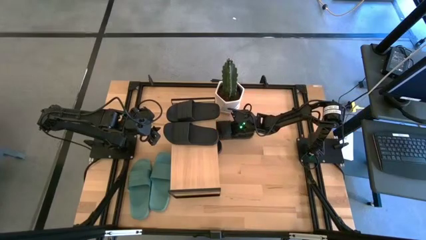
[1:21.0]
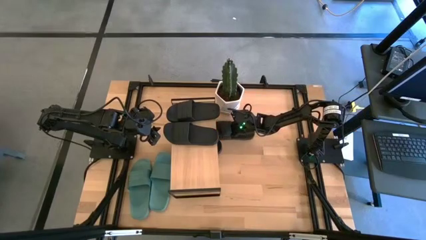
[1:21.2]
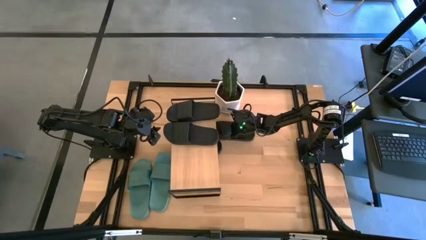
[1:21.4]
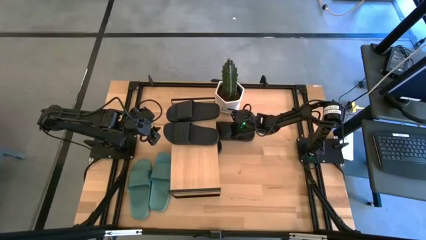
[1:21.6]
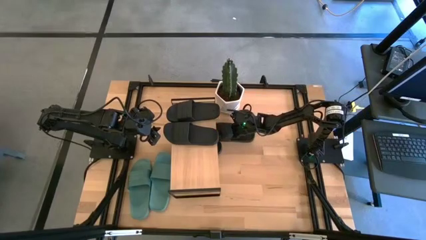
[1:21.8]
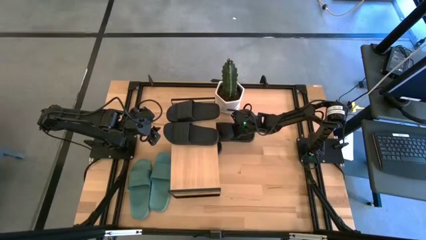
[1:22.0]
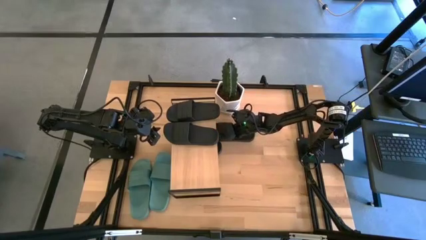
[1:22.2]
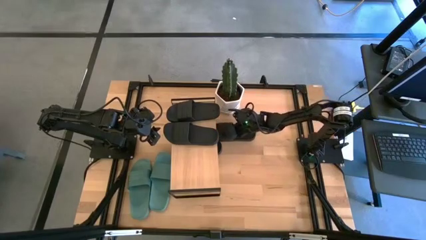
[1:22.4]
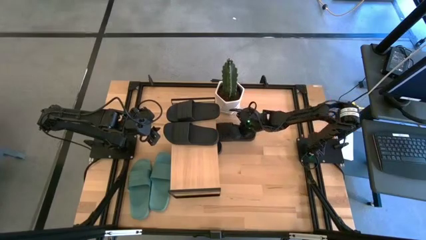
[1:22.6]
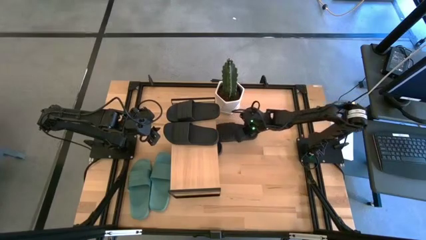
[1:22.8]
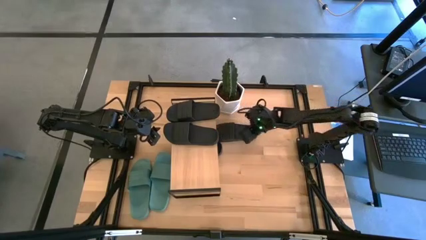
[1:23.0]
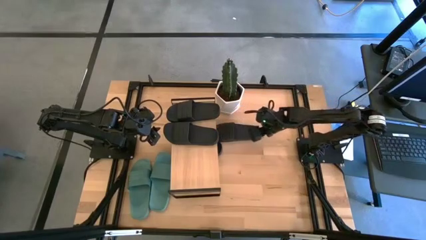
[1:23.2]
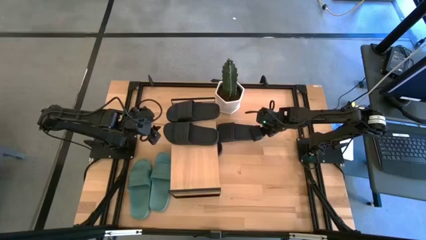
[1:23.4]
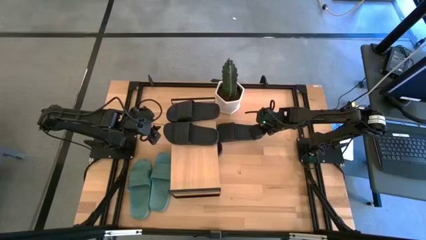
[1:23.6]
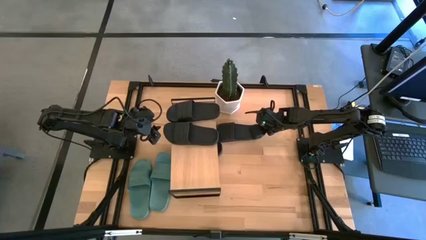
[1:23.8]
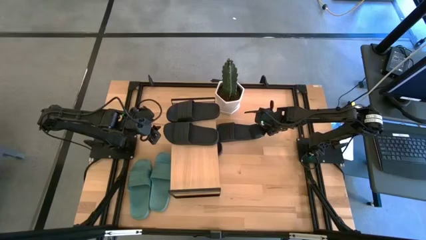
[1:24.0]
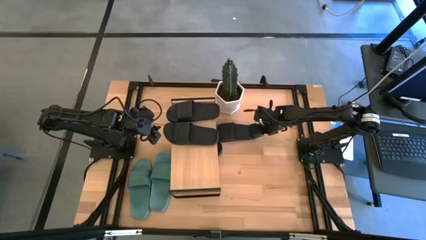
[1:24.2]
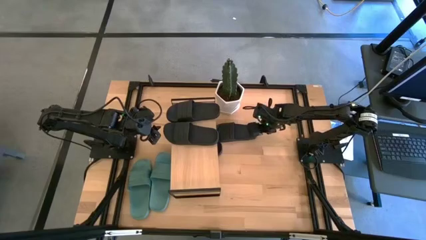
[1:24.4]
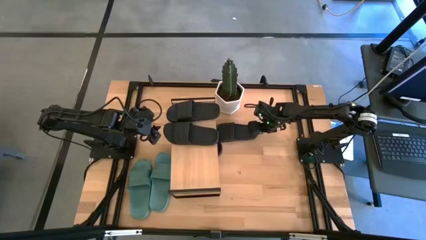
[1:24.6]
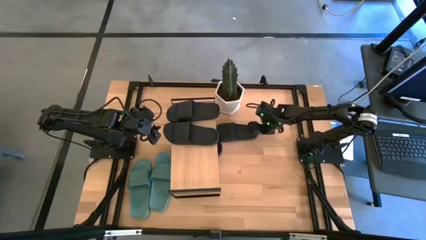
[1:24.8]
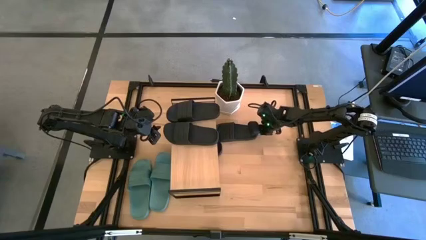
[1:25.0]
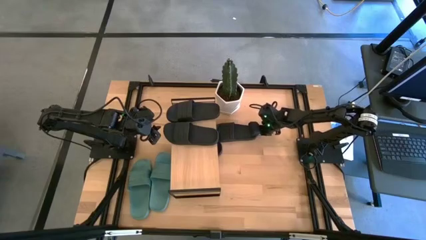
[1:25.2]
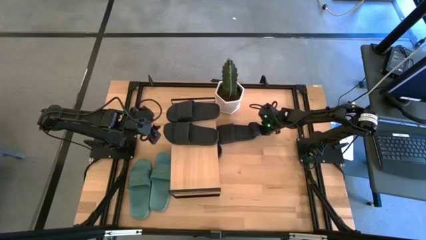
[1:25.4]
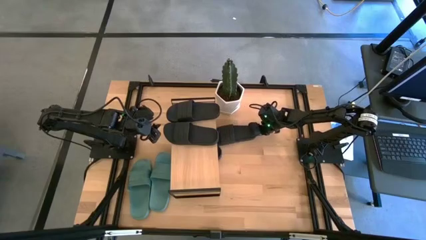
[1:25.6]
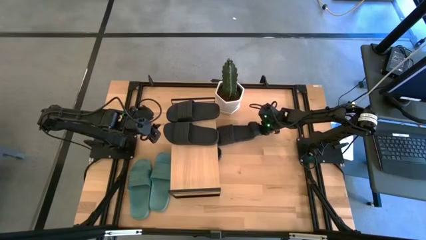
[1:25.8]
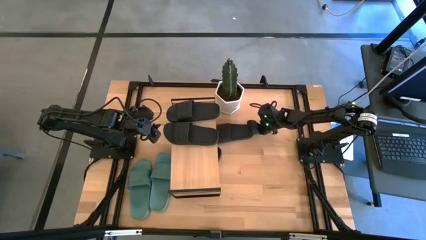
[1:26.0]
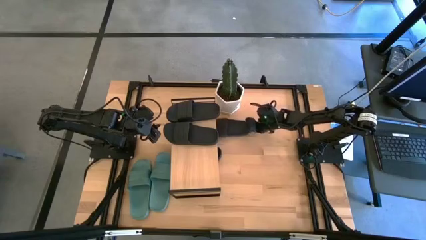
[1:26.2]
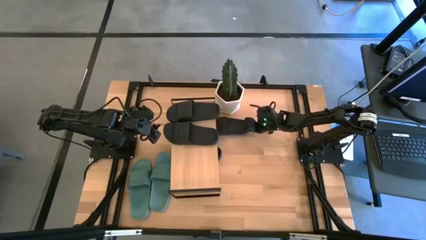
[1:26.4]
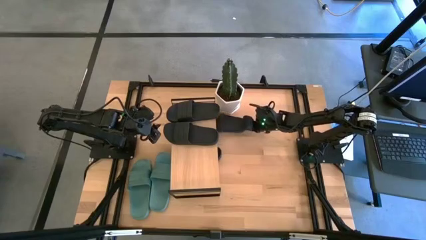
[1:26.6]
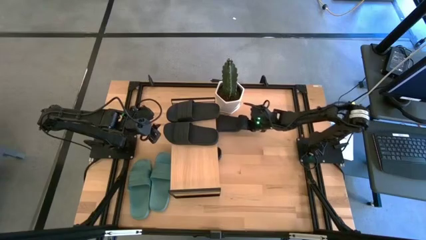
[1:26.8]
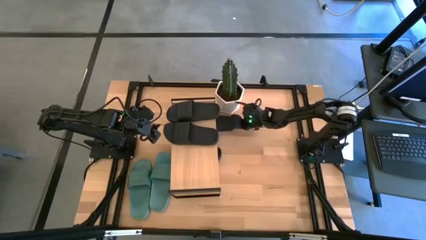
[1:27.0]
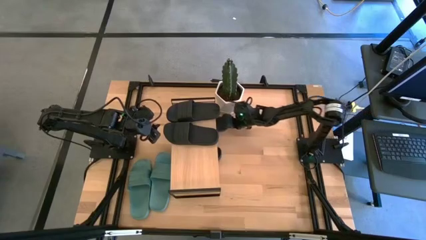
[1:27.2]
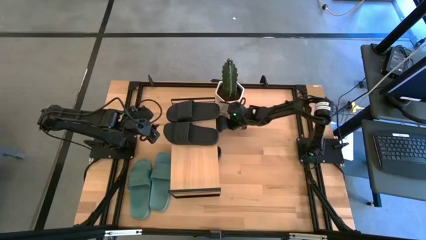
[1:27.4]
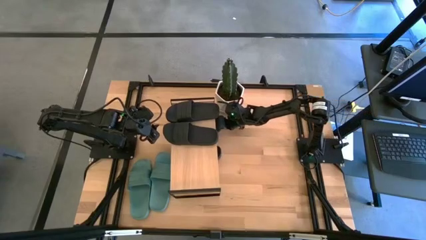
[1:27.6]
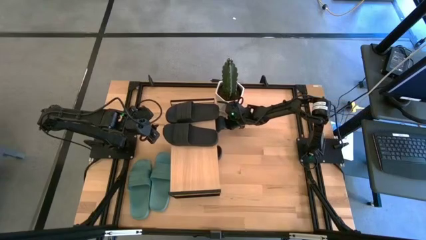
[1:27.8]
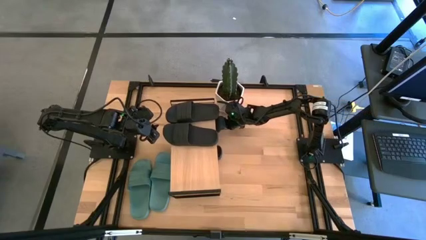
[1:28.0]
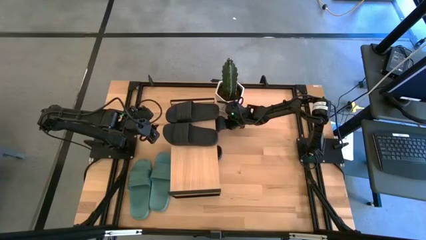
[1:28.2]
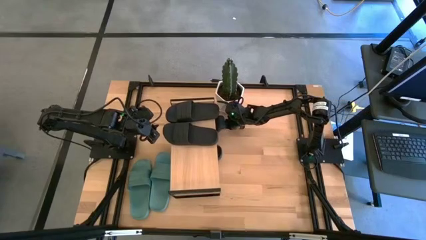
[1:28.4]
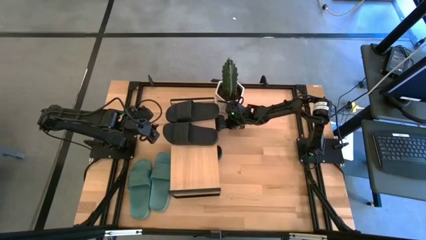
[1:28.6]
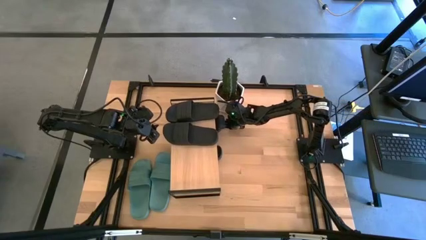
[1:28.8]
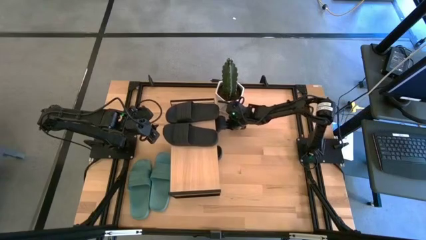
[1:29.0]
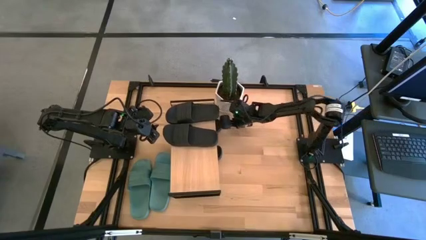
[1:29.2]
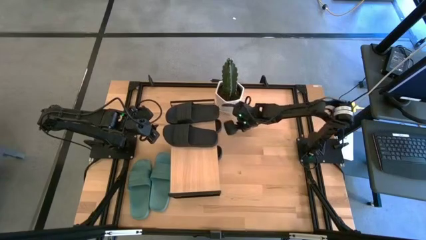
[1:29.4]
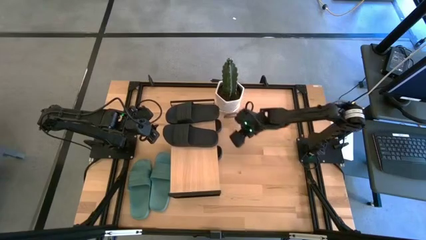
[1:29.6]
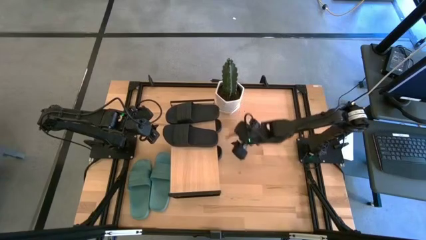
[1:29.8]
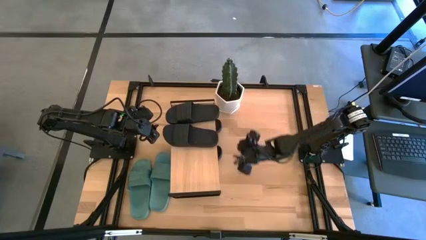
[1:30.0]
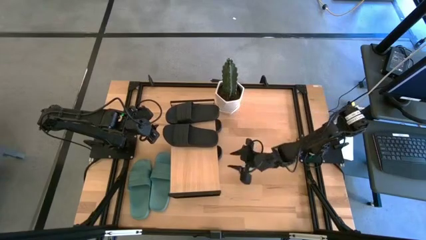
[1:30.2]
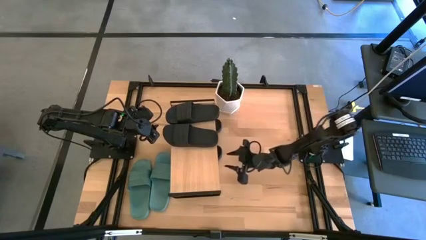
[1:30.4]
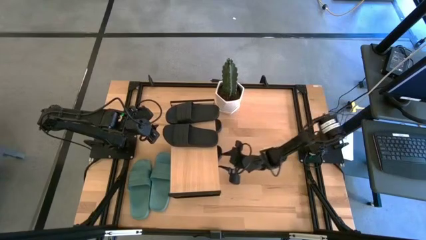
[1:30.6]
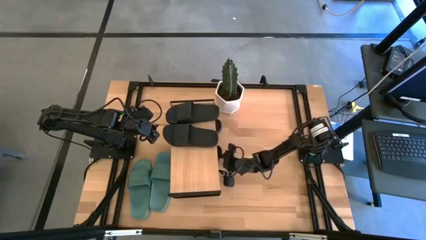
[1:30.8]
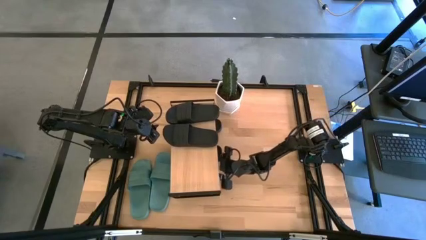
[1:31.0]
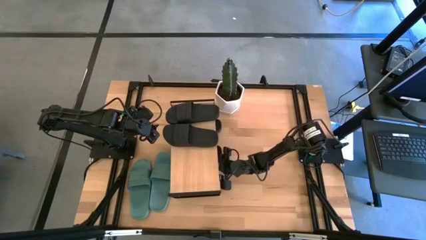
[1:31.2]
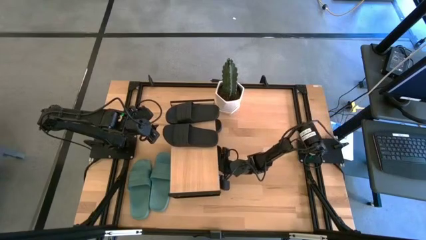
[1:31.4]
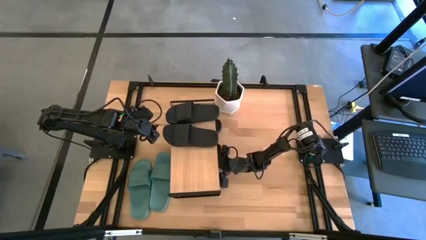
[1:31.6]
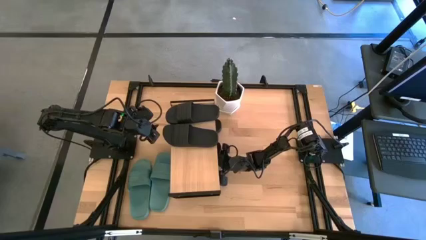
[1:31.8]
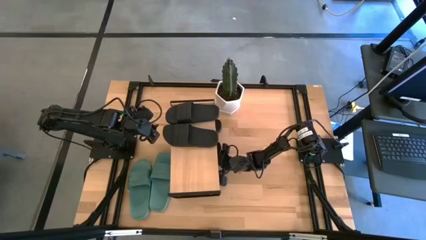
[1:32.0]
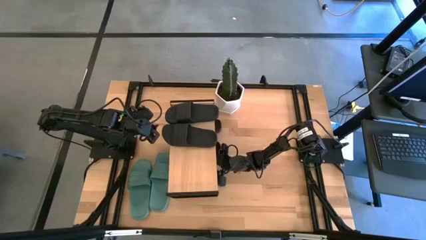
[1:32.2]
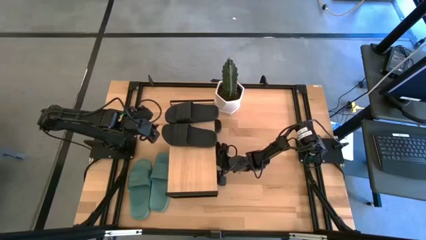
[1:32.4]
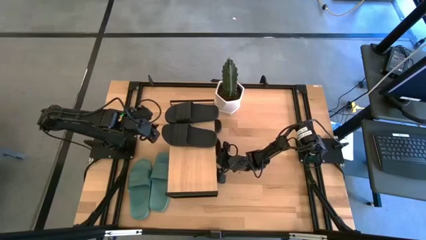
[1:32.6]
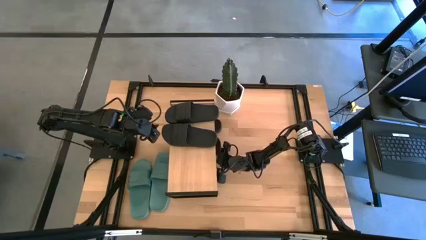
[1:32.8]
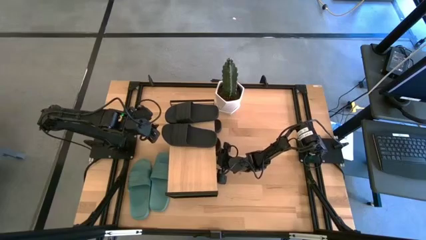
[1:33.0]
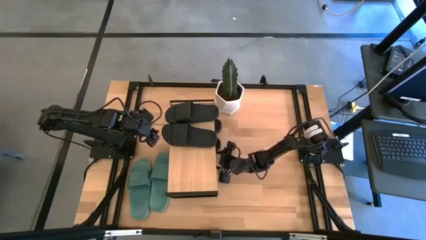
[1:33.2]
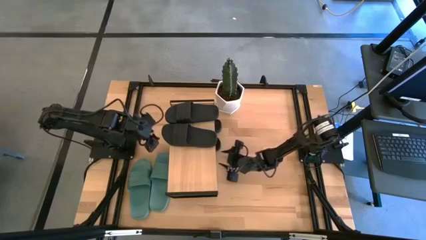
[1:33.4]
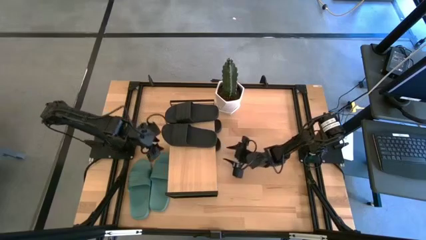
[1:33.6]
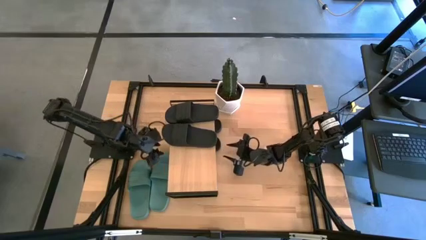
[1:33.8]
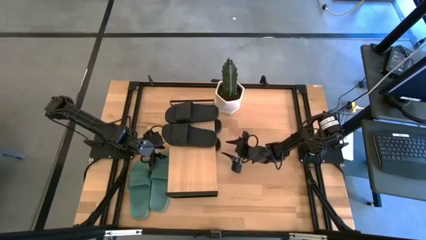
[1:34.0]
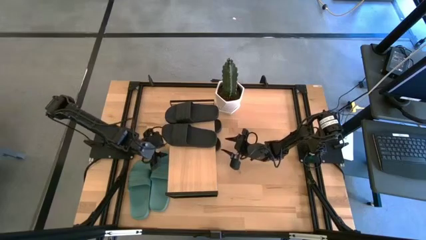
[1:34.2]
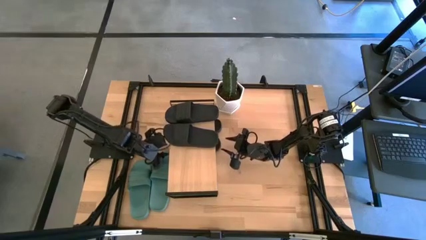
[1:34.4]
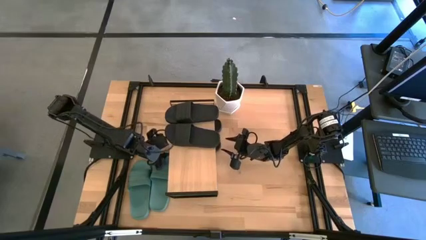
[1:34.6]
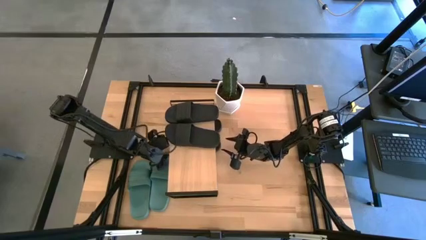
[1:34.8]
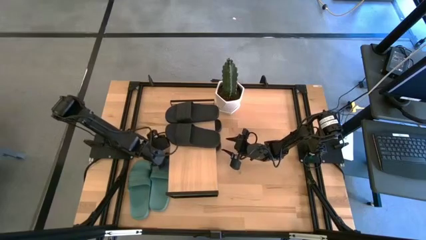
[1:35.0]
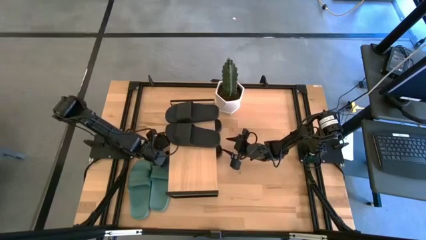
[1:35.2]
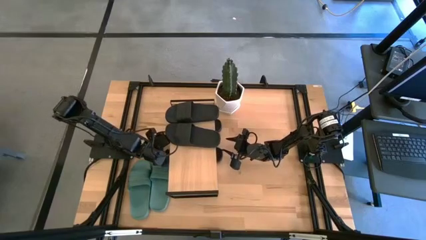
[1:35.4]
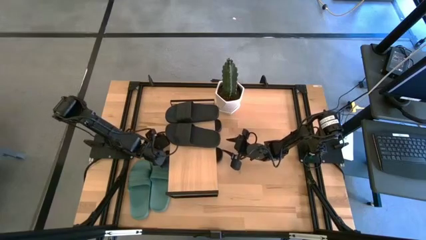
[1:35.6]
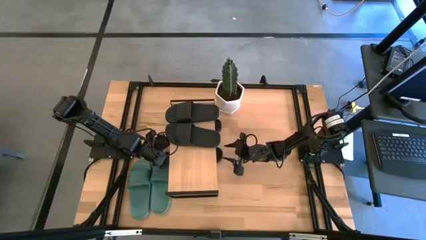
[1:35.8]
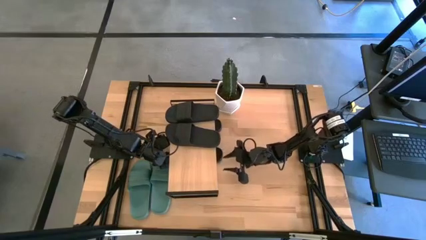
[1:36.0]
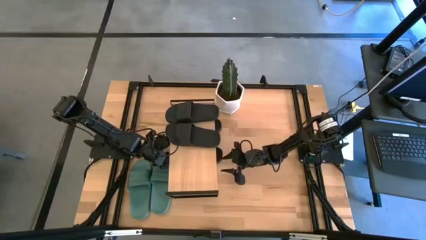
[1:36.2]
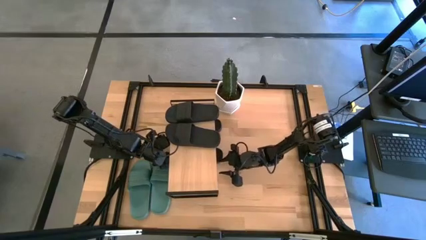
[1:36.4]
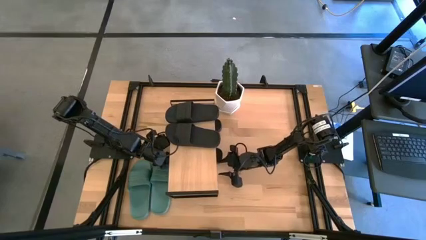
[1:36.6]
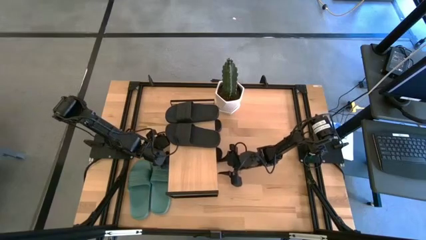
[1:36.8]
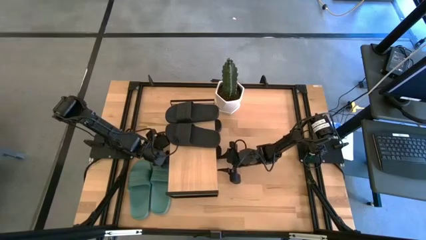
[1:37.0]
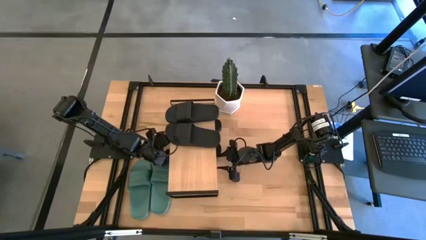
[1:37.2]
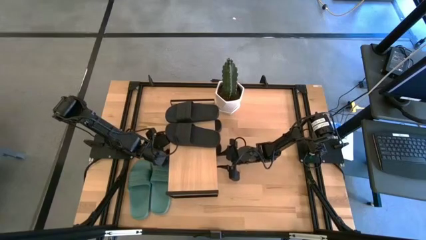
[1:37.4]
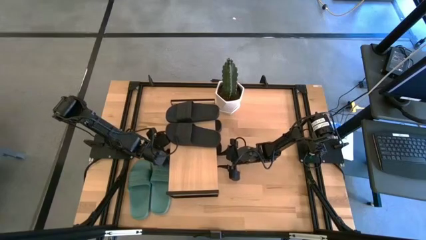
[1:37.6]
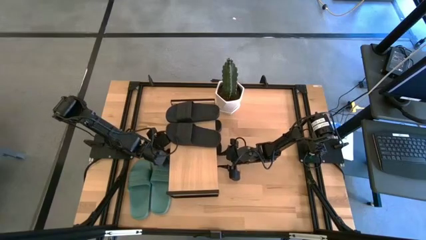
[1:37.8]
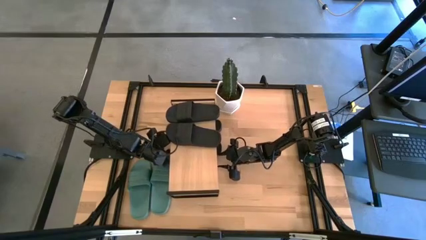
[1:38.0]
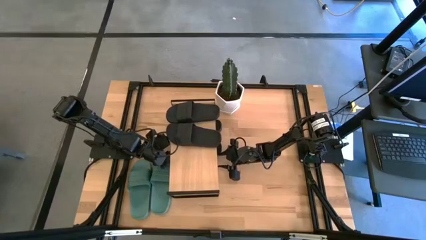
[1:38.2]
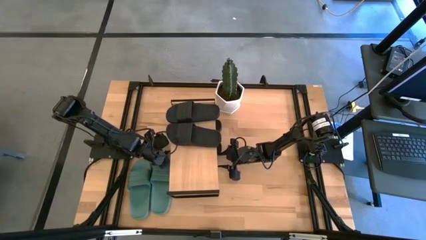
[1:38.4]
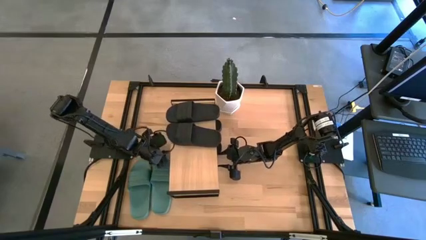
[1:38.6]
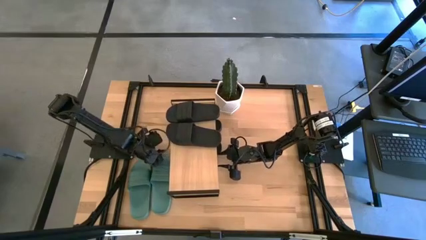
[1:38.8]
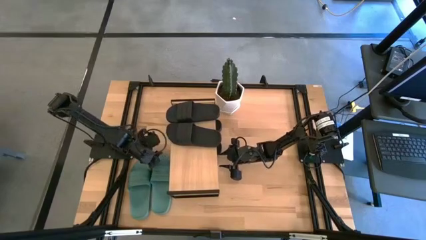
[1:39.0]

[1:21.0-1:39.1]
Task: Pick and place slides into the shelf
Put the black slides under the shelf
